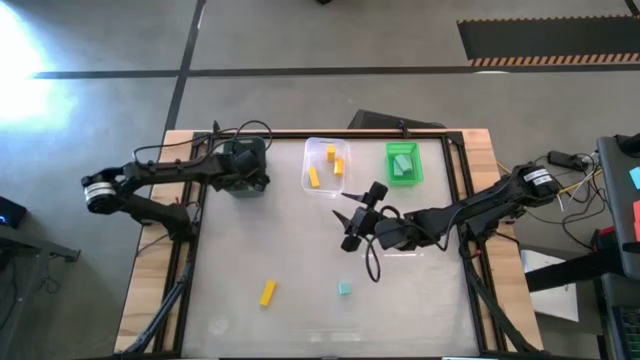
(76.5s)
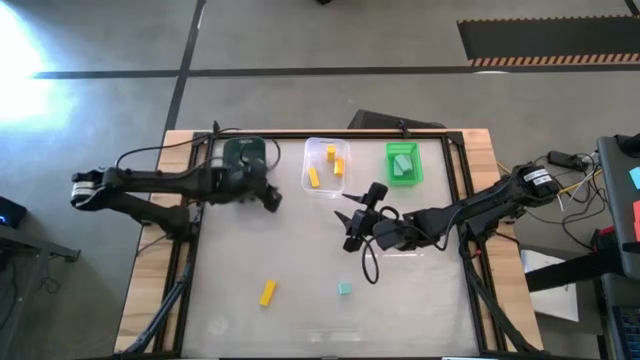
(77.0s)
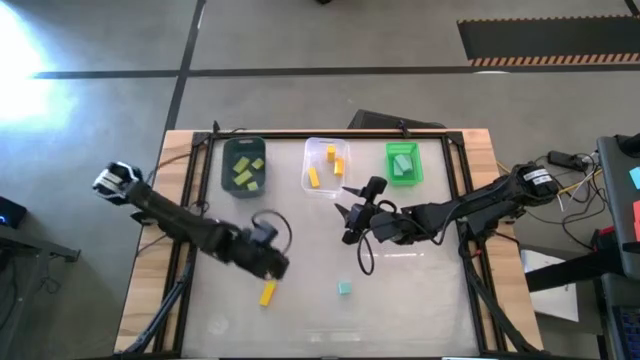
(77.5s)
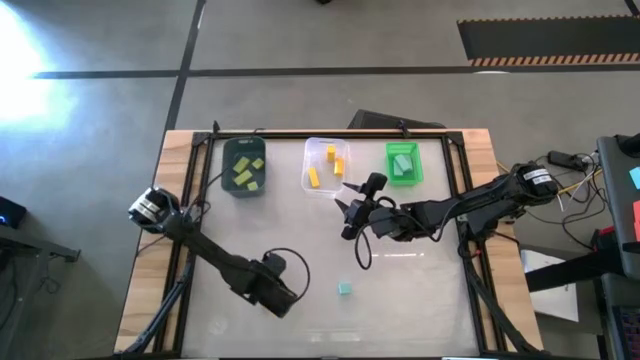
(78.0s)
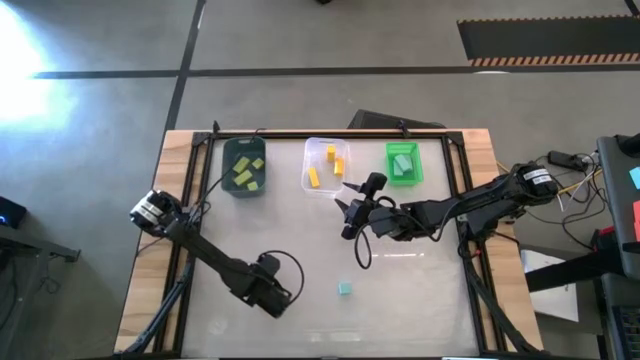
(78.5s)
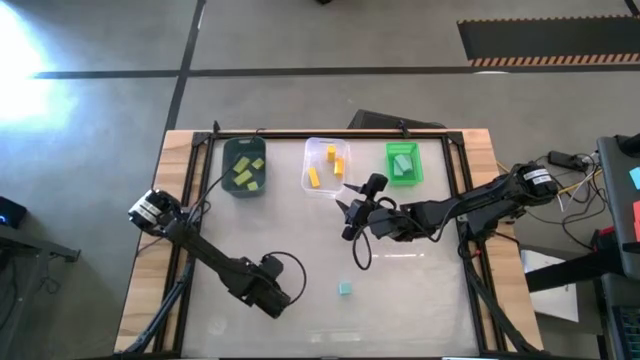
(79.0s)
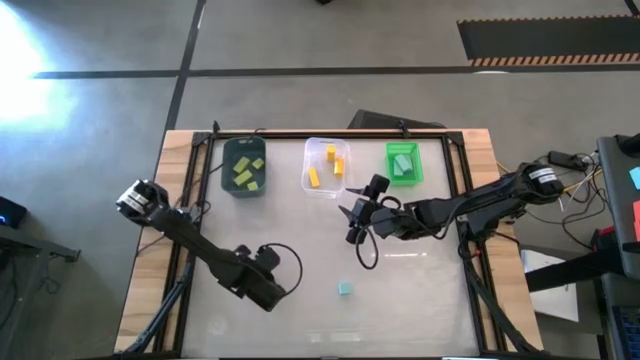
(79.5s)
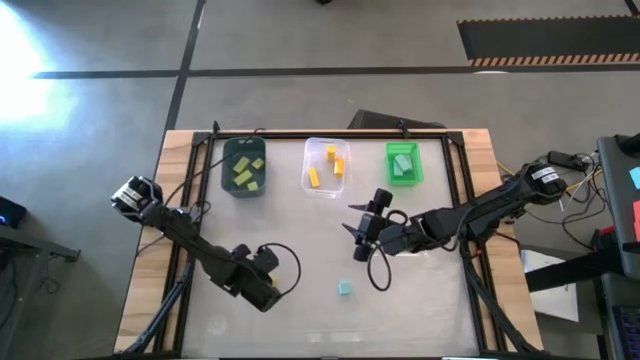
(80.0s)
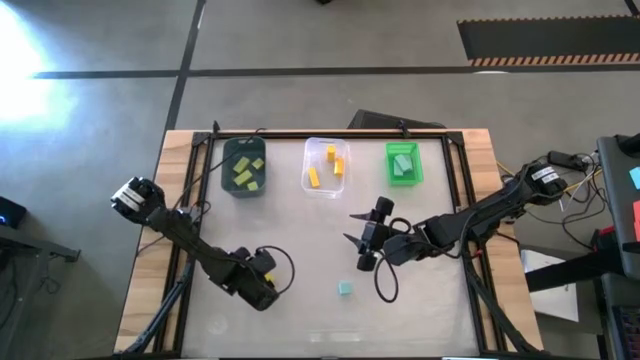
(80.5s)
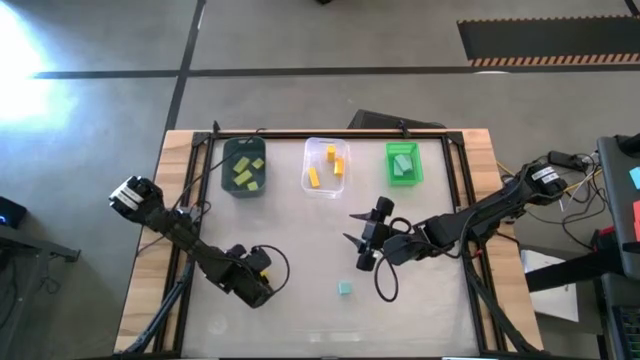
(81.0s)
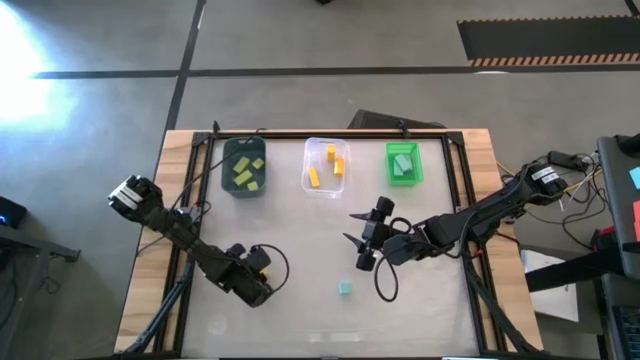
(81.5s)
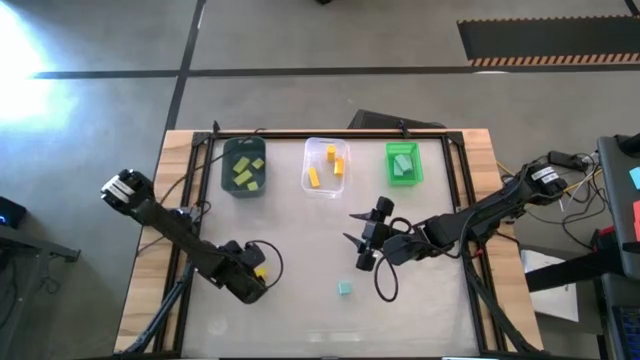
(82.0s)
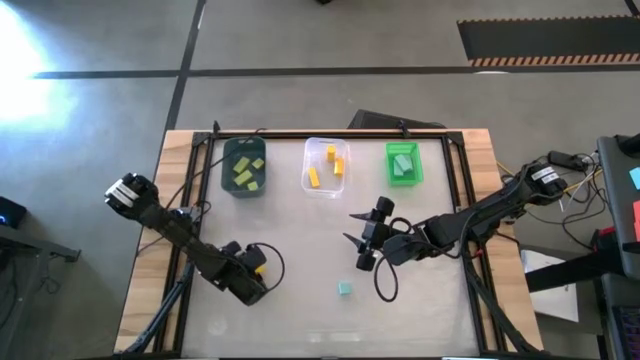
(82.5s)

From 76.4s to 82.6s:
Task: Sort & place blocks by color
Put the yellow block into the transparent bin

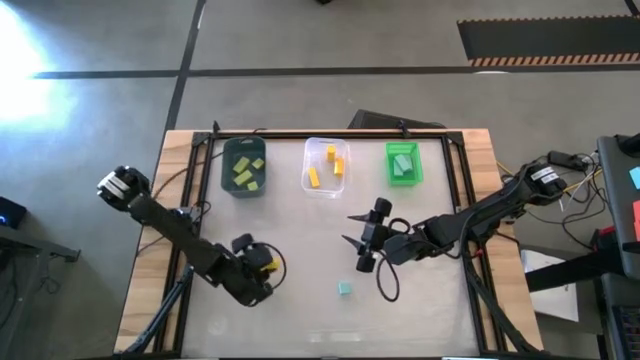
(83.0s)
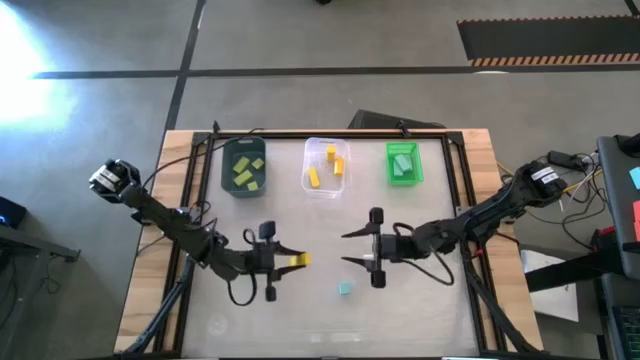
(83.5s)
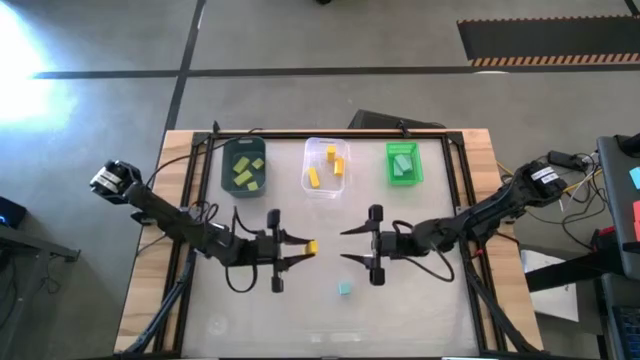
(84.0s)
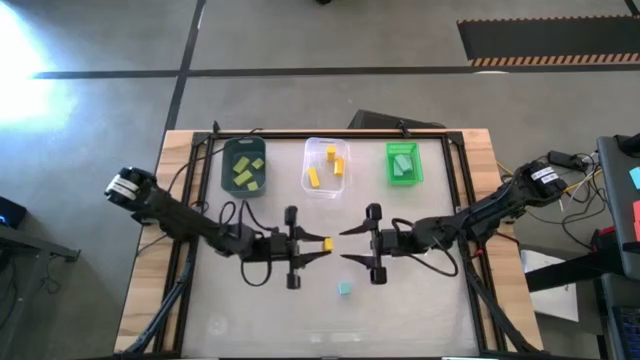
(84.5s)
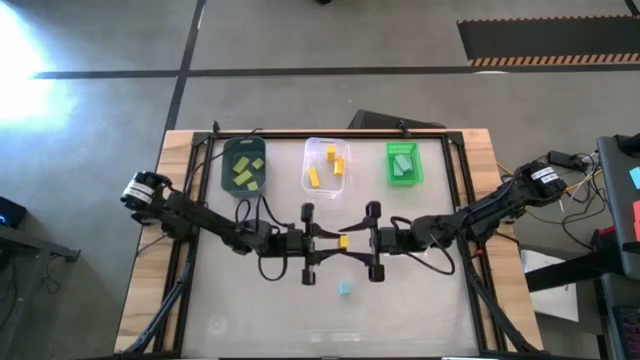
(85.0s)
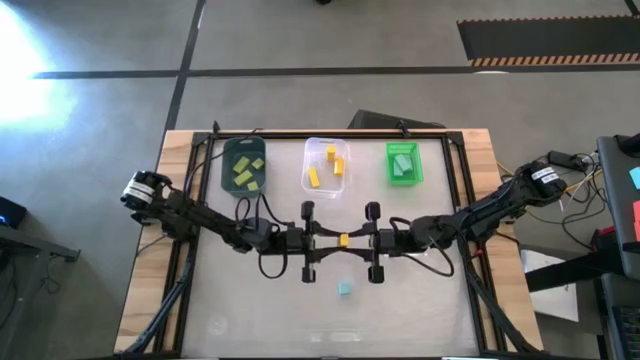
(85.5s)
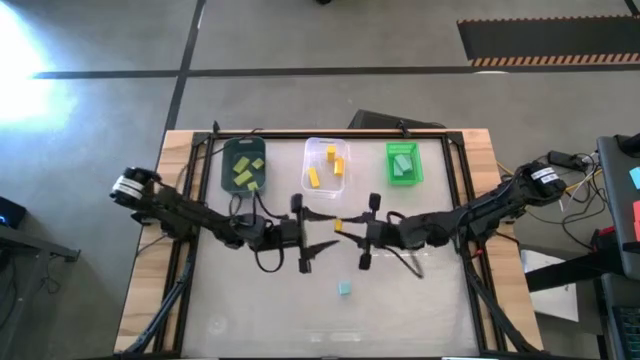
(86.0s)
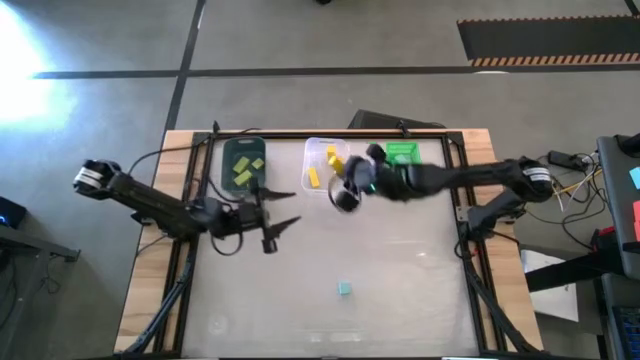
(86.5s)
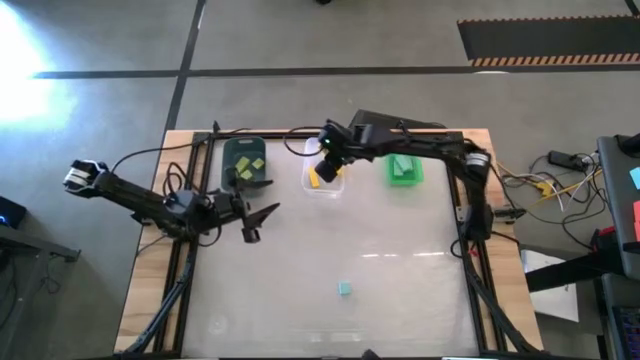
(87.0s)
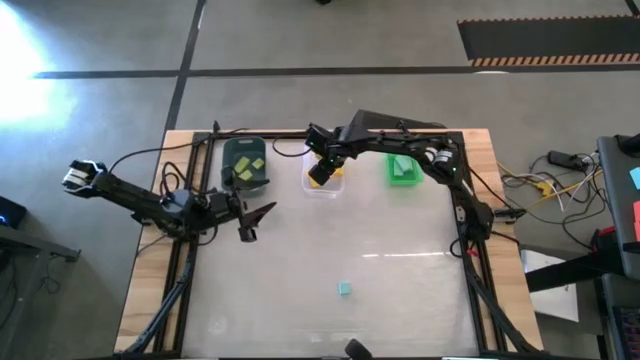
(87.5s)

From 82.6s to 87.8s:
Put the yellow block into the transparent bin

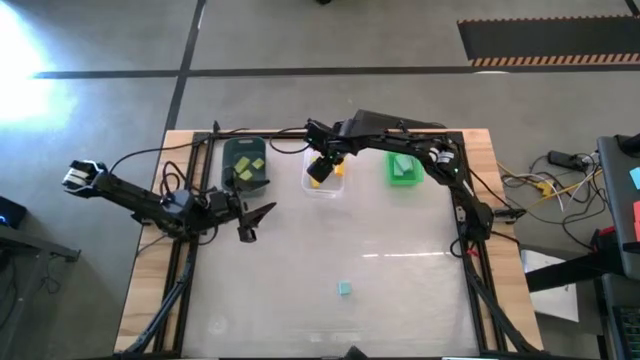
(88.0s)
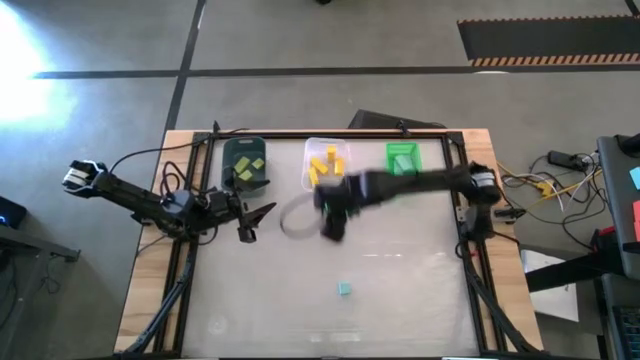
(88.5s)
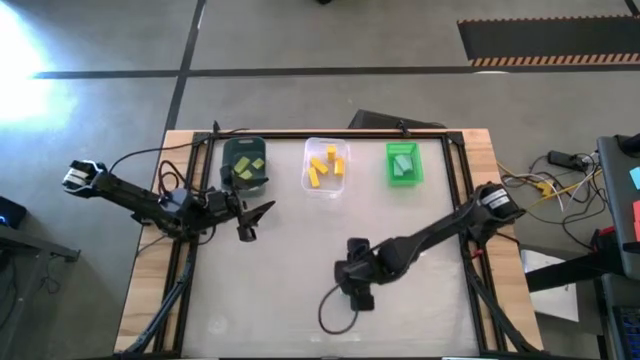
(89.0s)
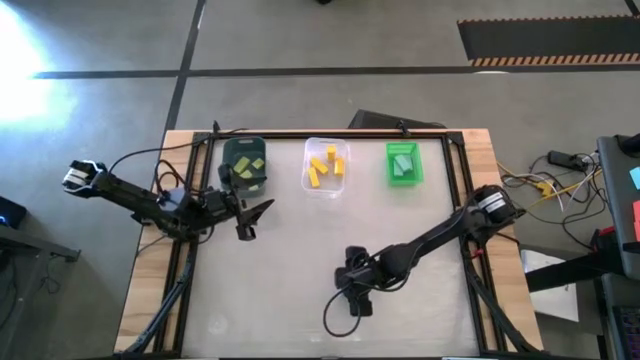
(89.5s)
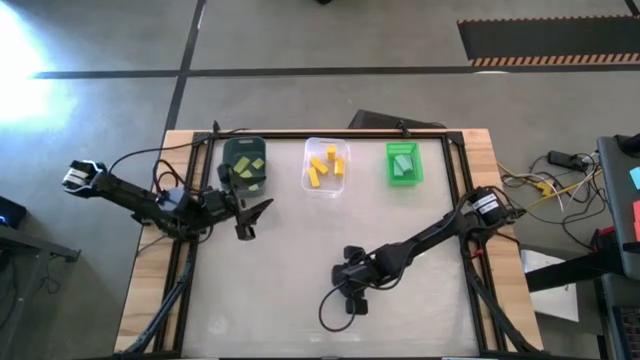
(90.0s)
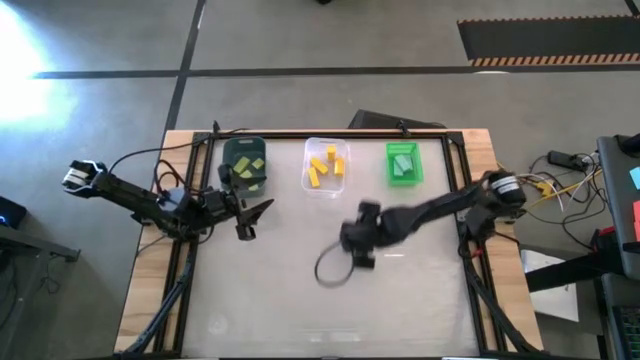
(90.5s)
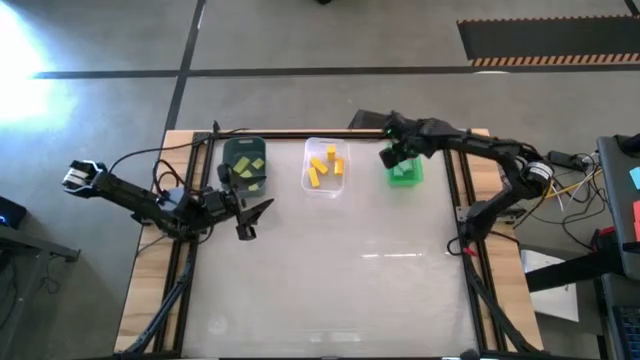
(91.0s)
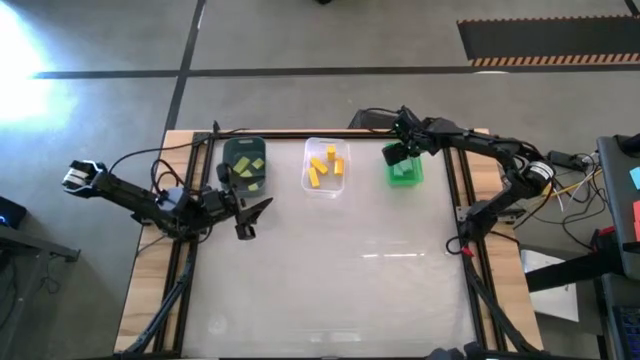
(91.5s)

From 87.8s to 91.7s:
Put the blue block into the green bin

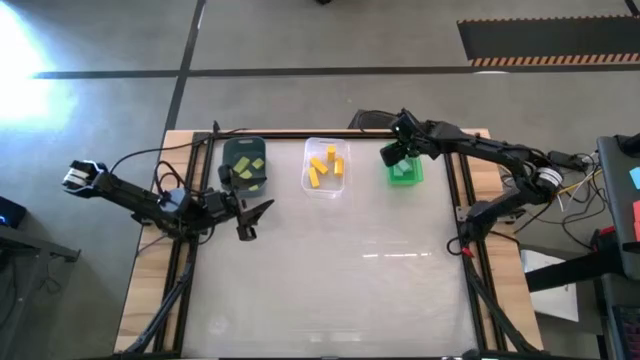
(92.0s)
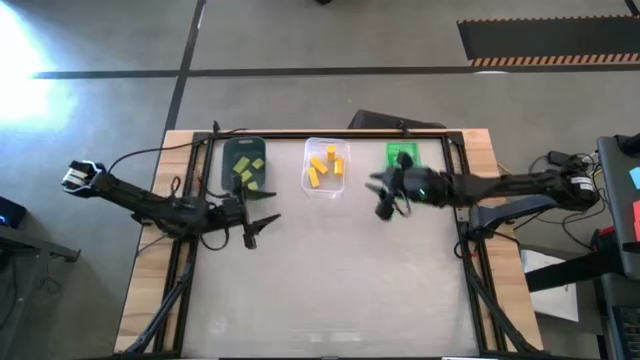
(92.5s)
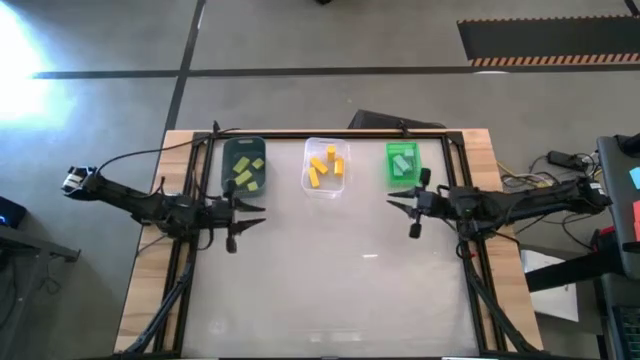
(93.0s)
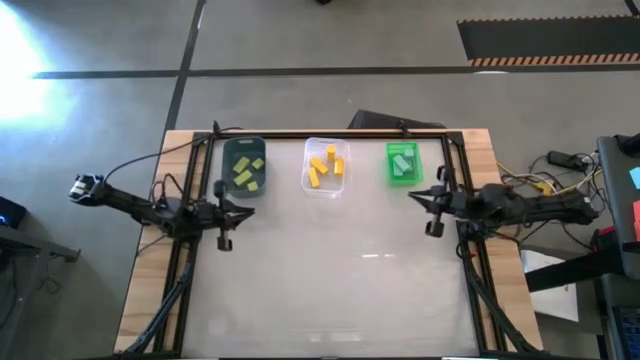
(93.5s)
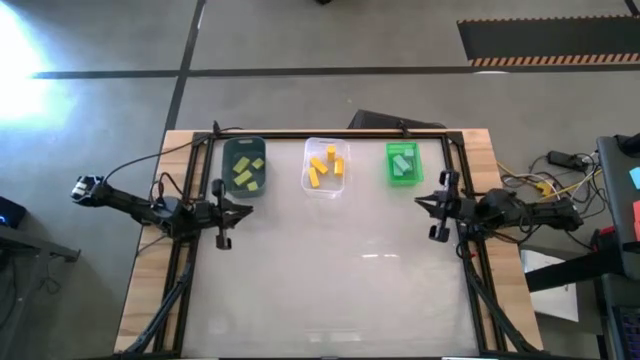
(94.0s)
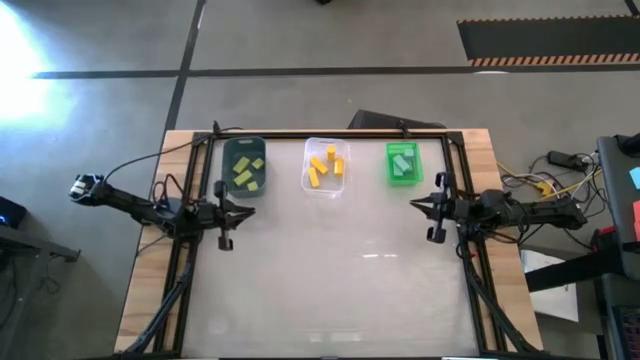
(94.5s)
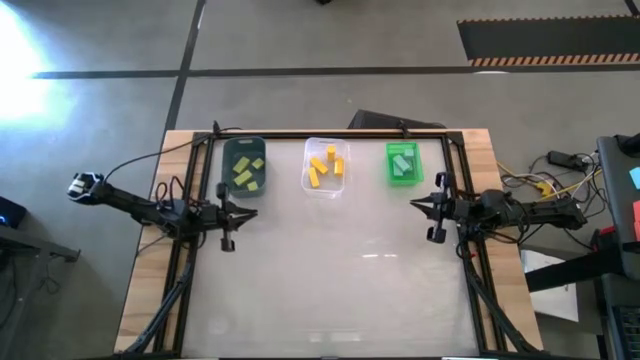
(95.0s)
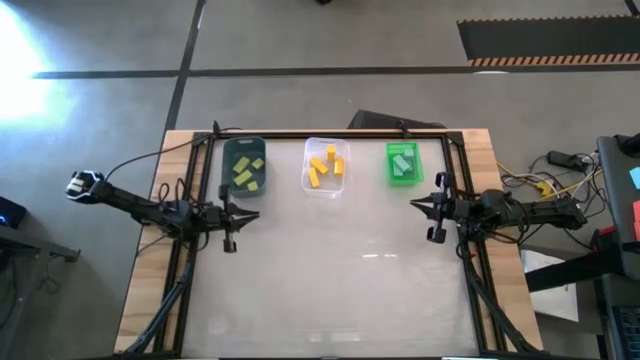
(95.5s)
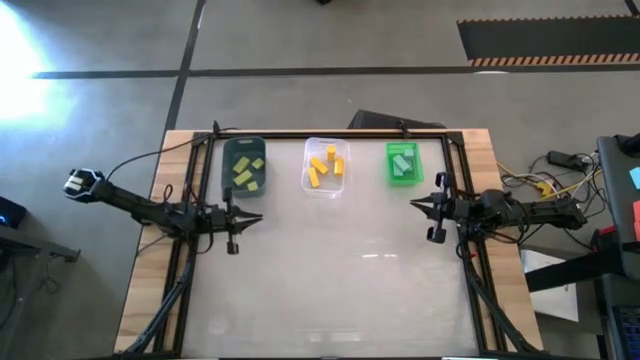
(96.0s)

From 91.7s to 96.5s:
Return to Home Position

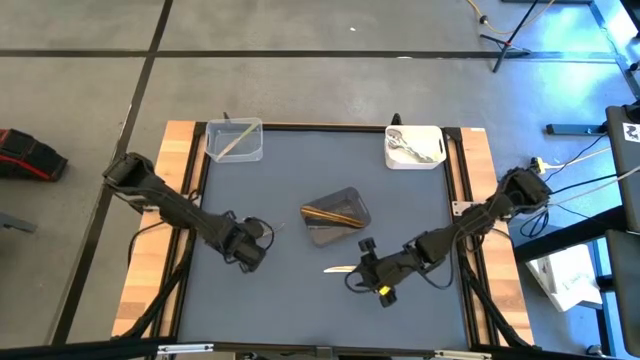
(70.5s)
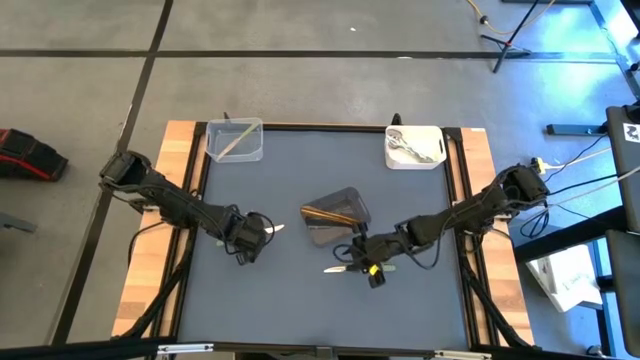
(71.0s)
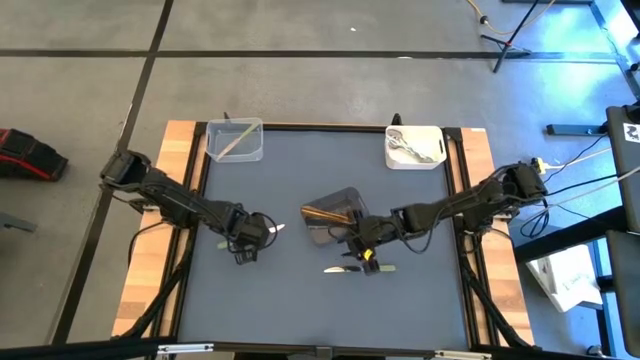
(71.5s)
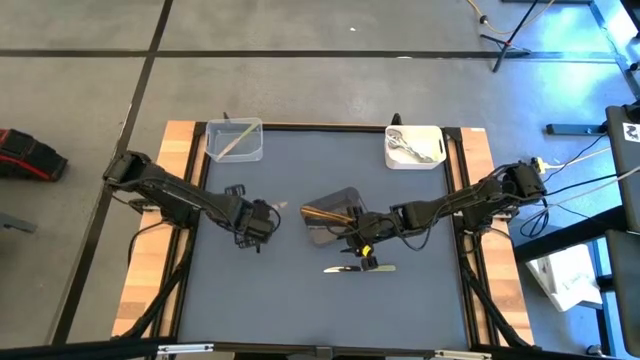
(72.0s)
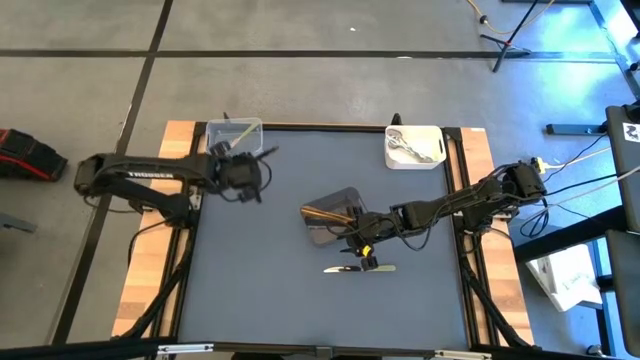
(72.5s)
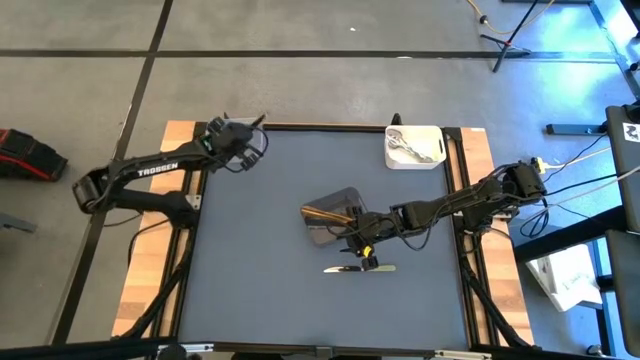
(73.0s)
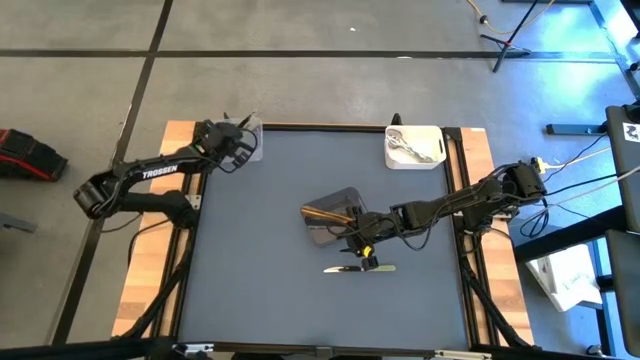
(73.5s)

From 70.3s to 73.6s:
Task: Sort silverware by color (type)
Put the green table knife into the transparent bin
